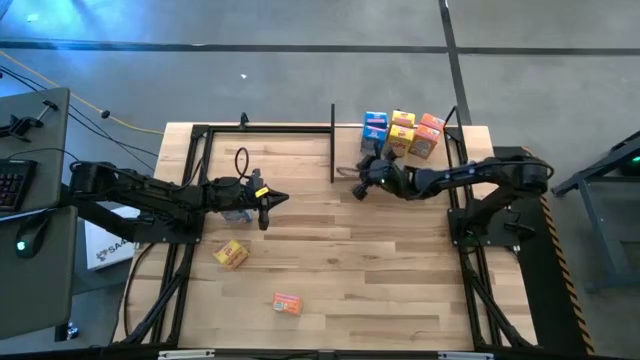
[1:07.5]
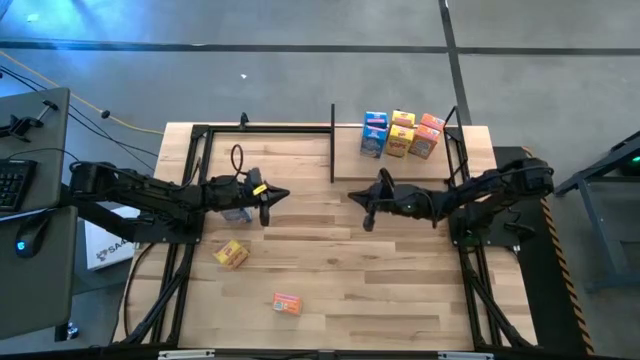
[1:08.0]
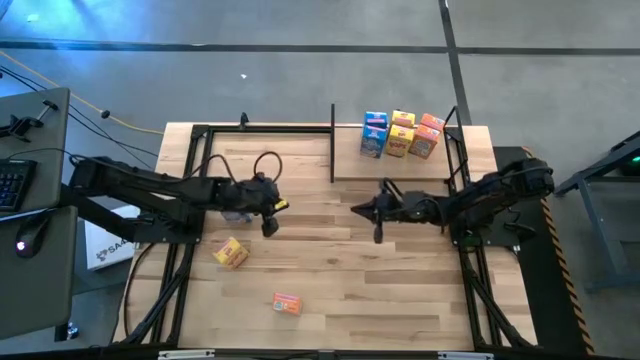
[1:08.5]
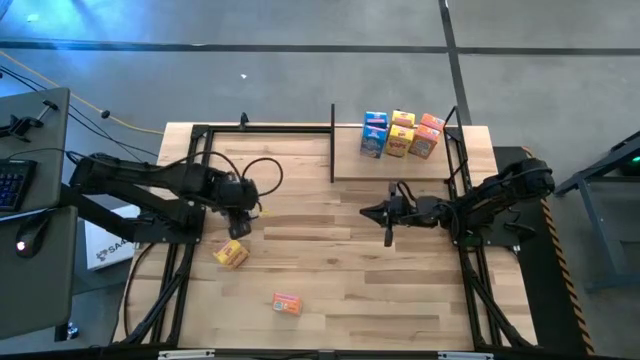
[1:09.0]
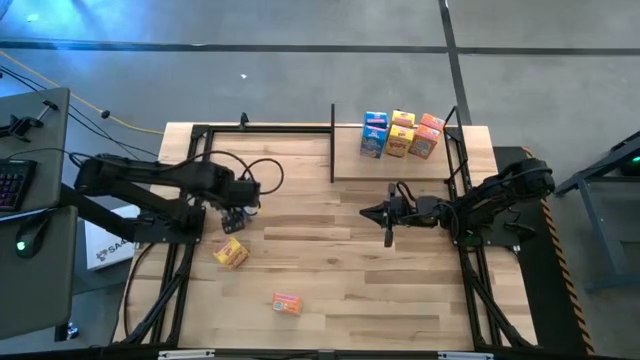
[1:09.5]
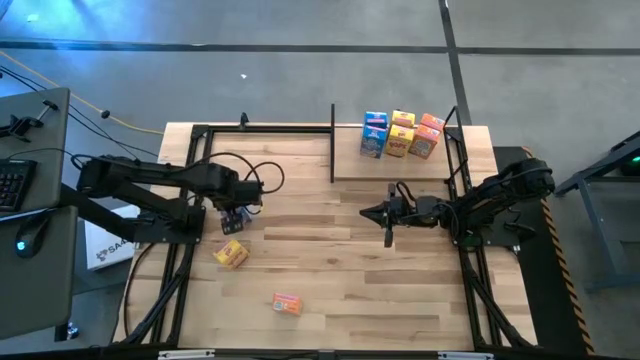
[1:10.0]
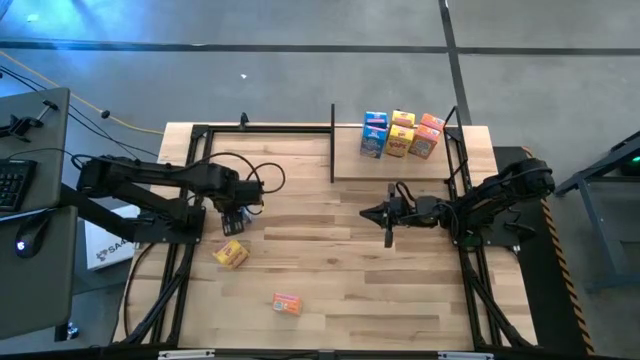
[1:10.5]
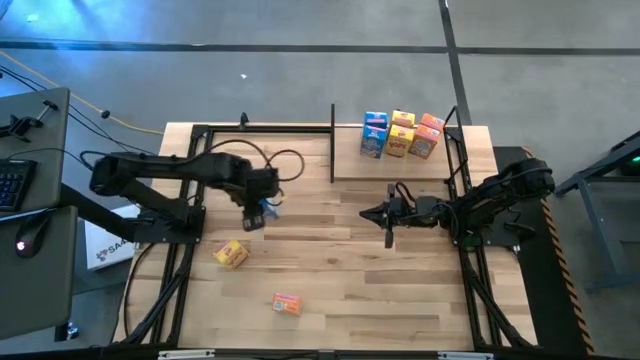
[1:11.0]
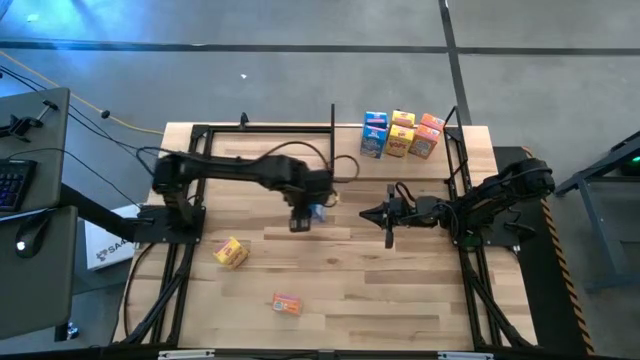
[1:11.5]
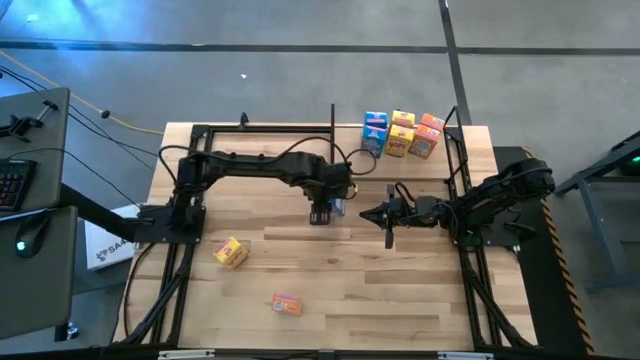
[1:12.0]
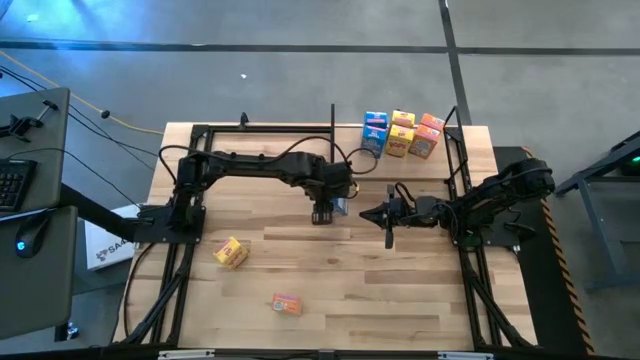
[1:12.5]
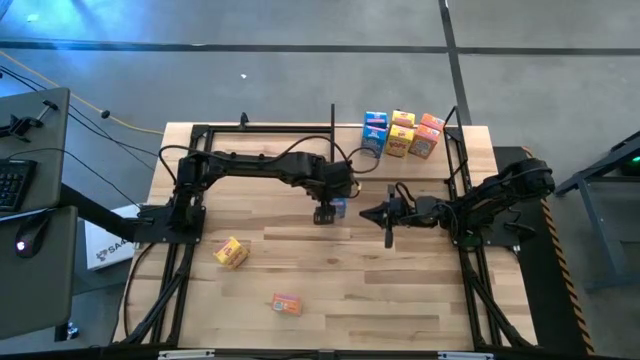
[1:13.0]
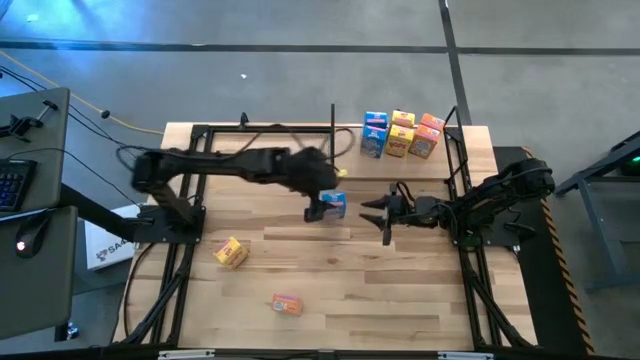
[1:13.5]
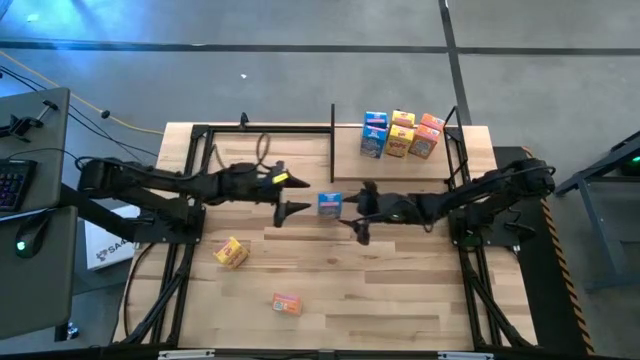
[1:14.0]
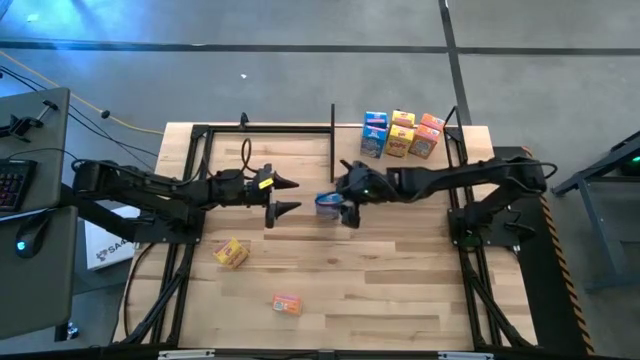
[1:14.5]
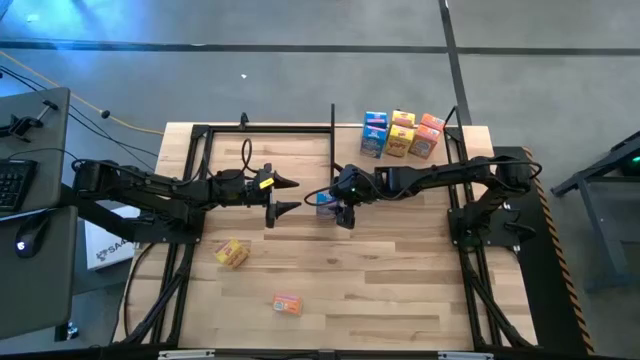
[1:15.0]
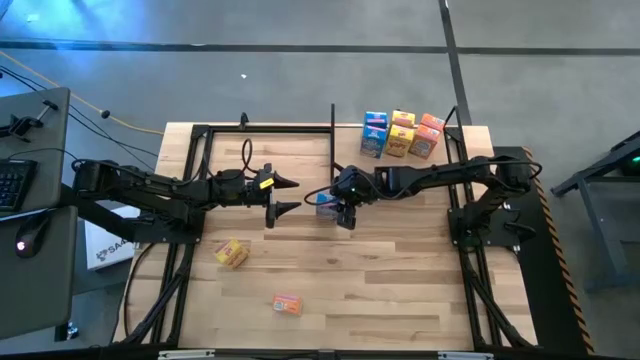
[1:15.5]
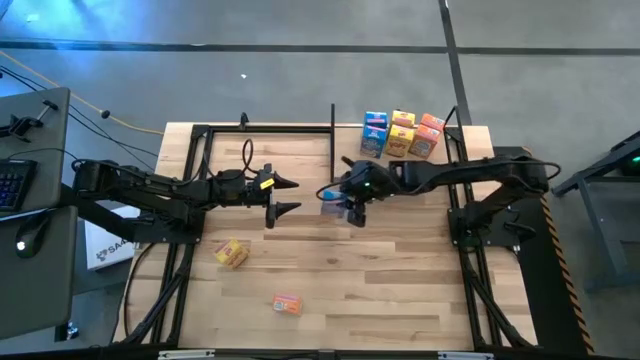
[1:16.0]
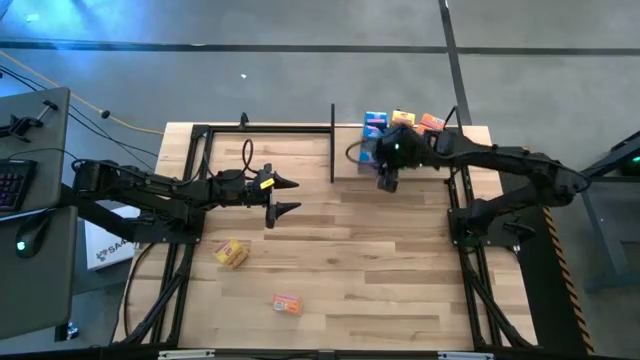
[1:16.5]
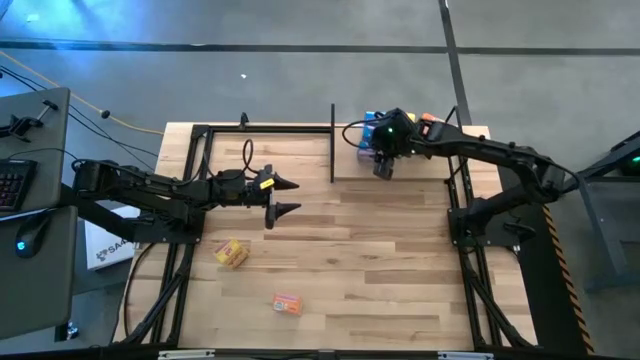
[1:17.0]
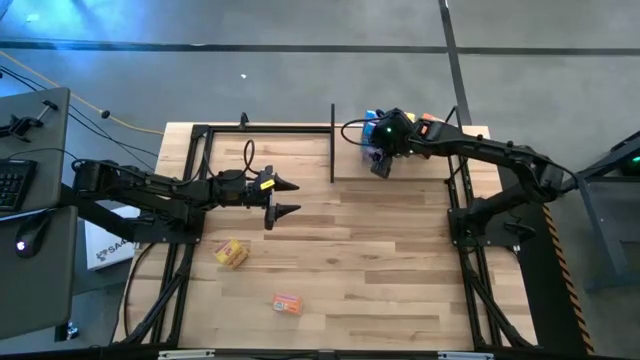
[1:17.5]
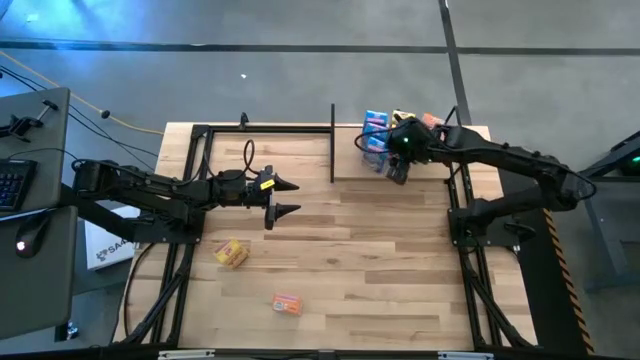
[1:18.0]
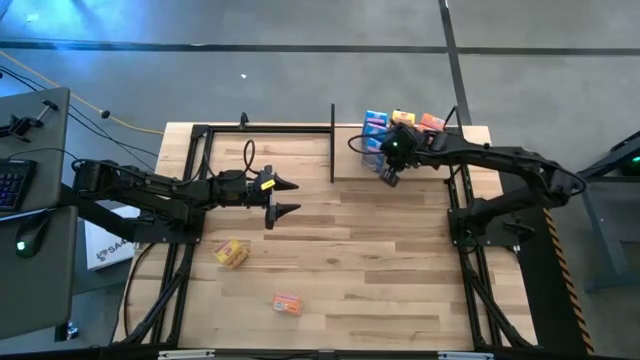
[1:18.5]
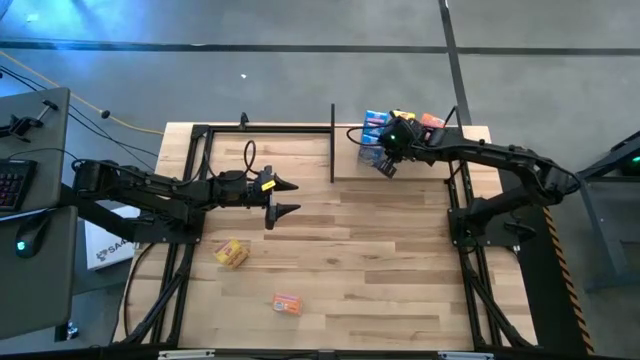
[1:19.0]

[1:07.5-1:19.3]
Task: Stack cereal on shelf
Put the blue cereal box on the shelf

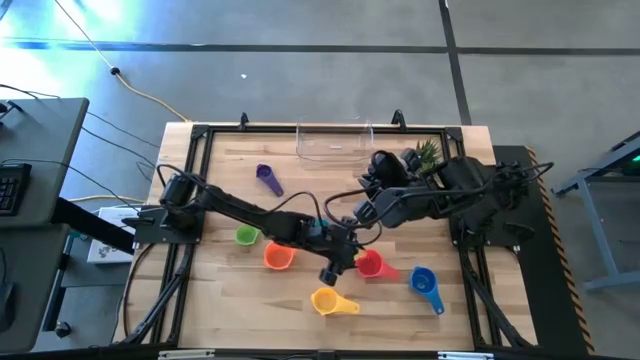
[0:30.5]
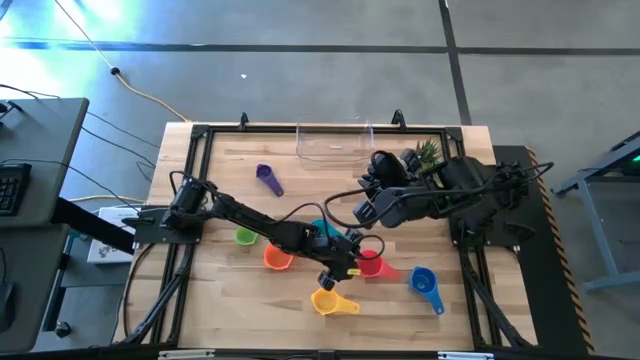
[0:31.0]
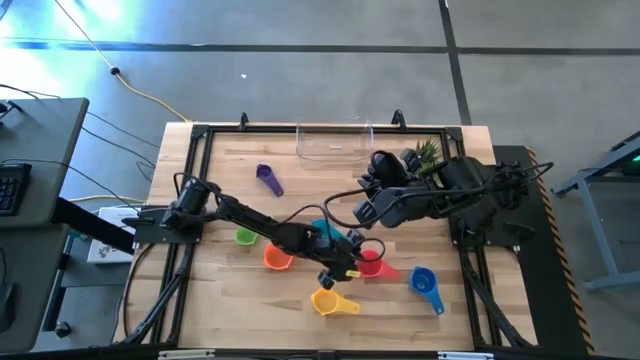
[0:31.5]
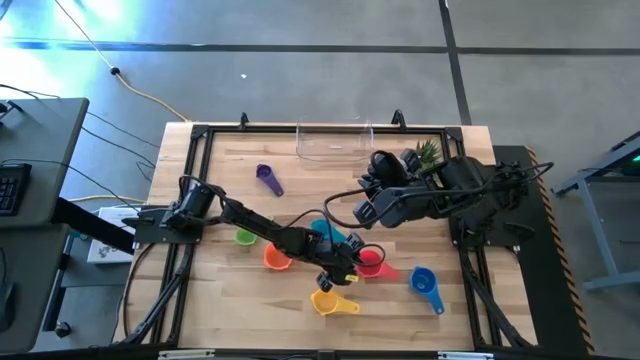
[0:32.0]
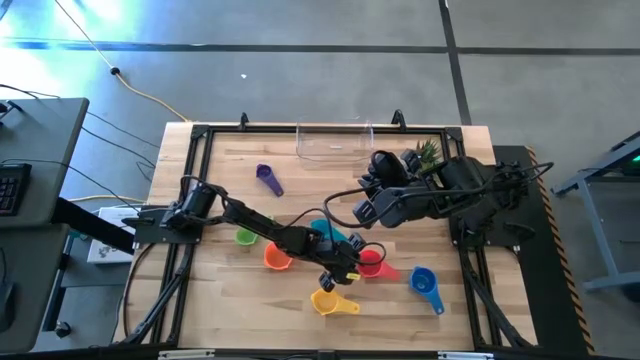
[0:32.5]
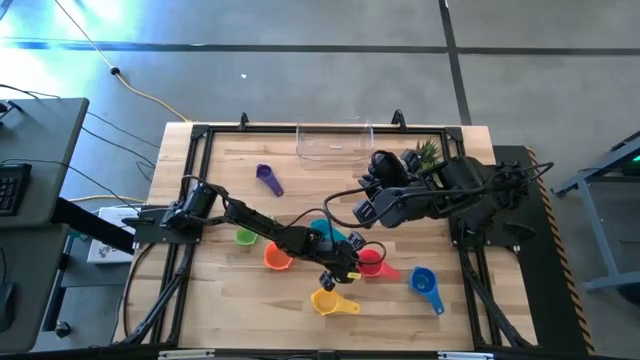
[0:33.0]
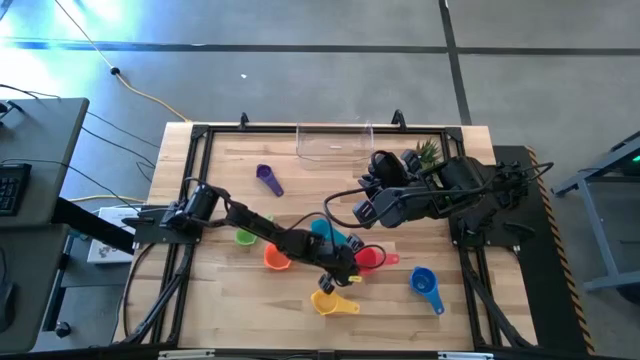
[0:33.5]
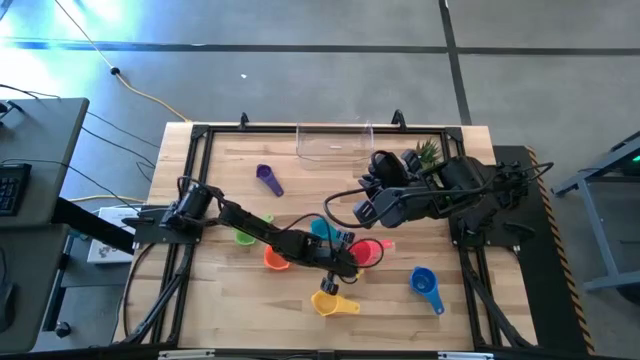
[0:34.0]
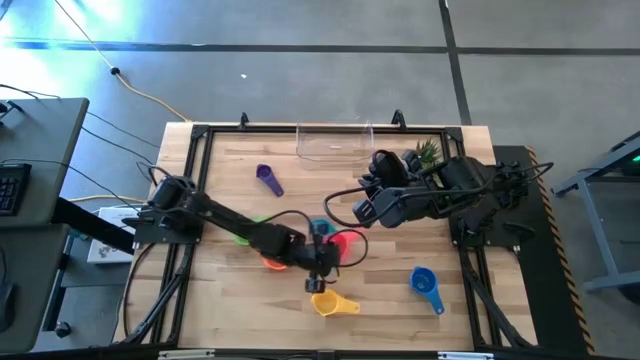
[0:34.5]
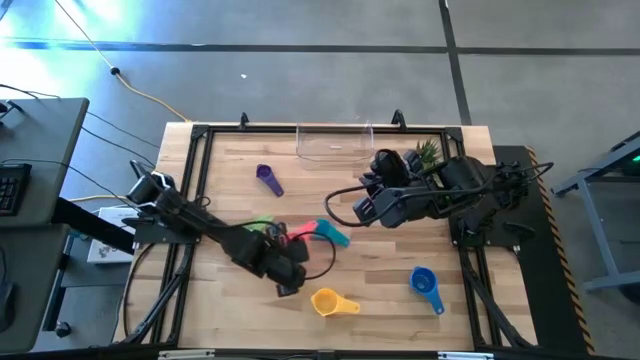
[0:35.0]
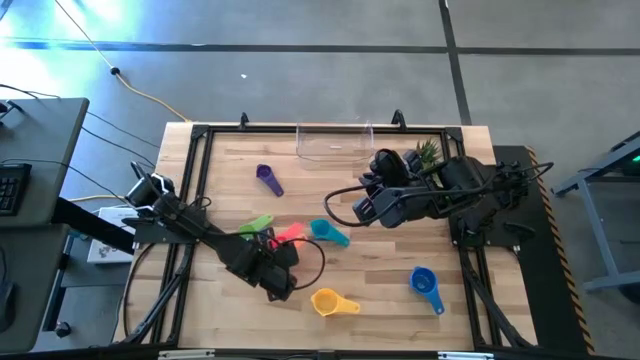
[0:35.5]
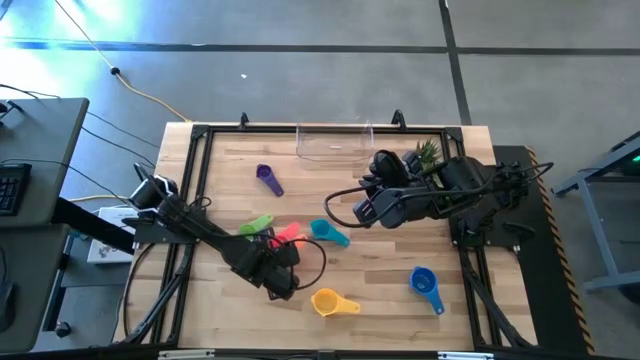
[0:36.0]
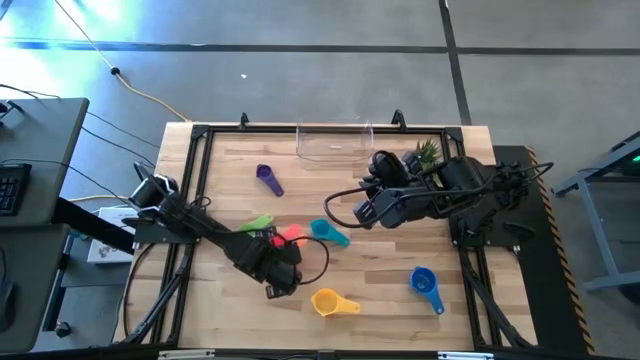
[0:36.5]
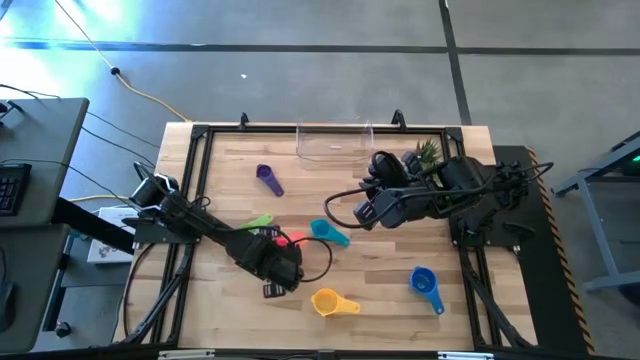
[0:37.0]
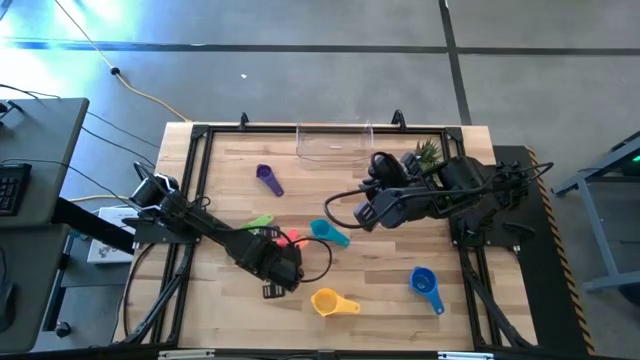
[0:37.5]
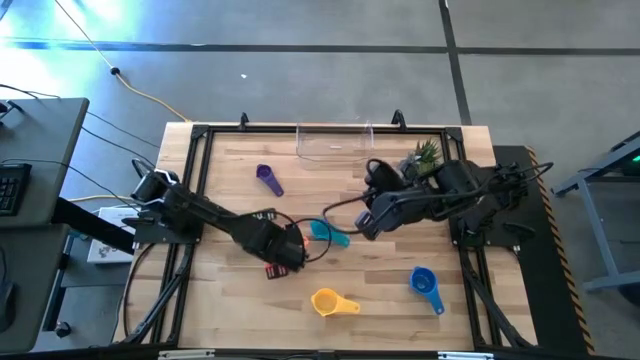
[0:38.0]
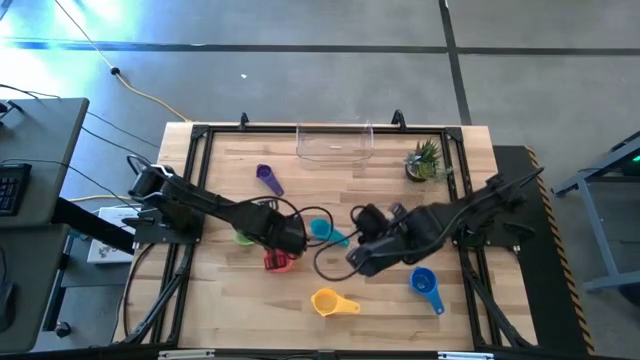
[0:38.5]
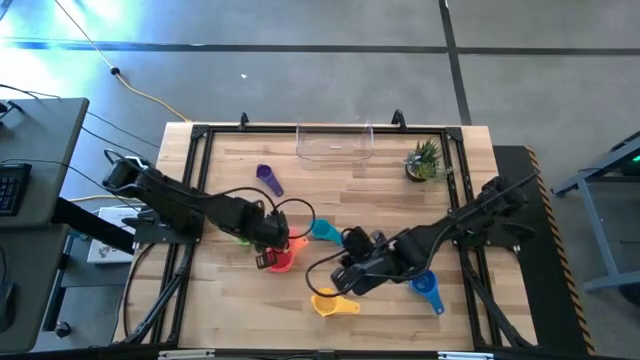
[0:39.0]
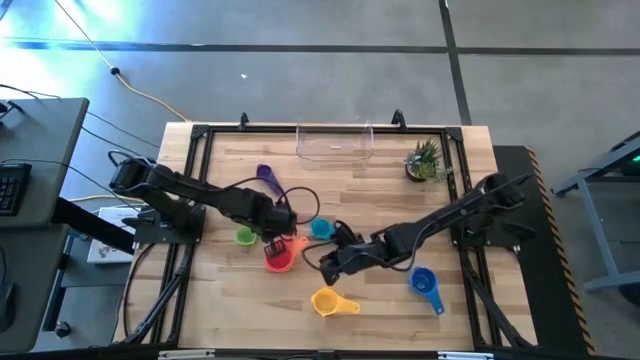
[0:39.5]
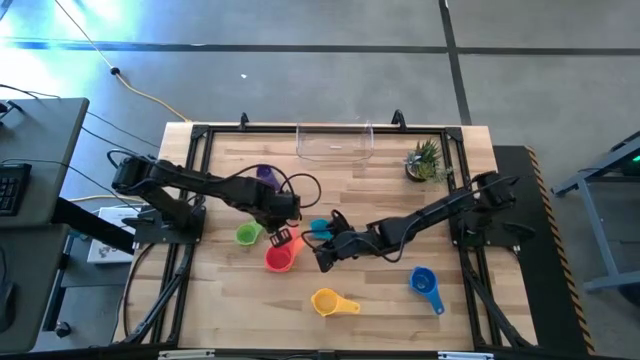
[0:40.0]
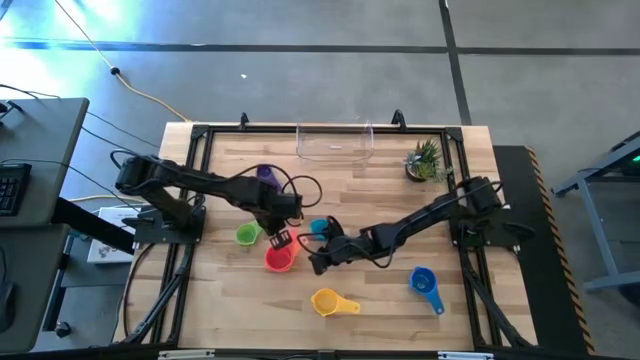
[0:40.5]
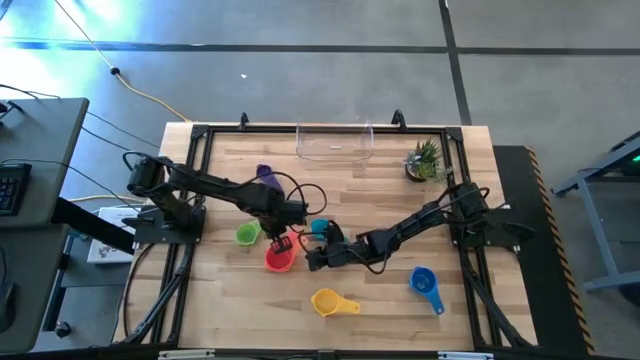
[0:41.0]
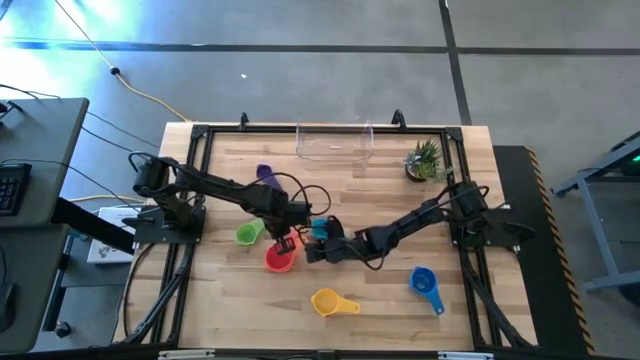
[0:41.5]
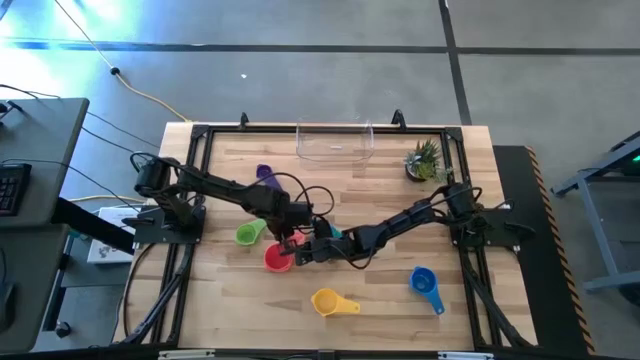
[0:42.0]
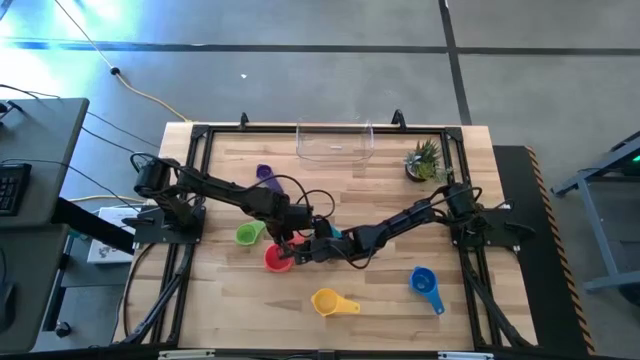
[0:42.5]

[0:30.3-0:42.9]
Task: Nest measuring cups in basket
Stack the red measuring cup on top of the orange measuring cup
